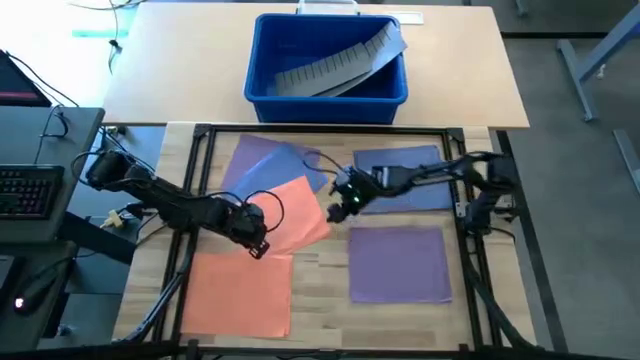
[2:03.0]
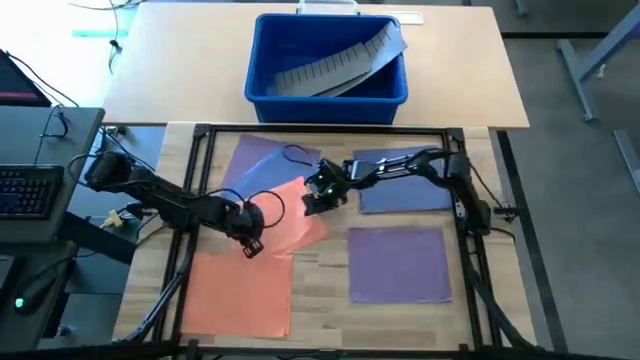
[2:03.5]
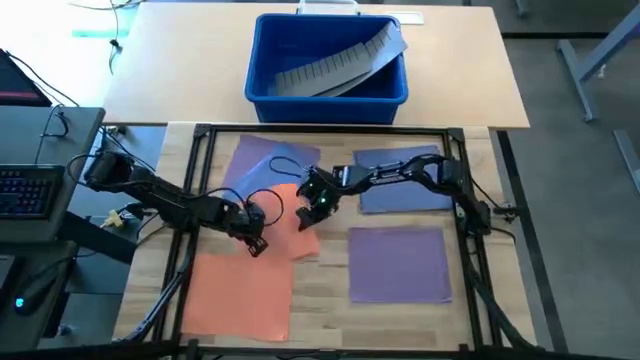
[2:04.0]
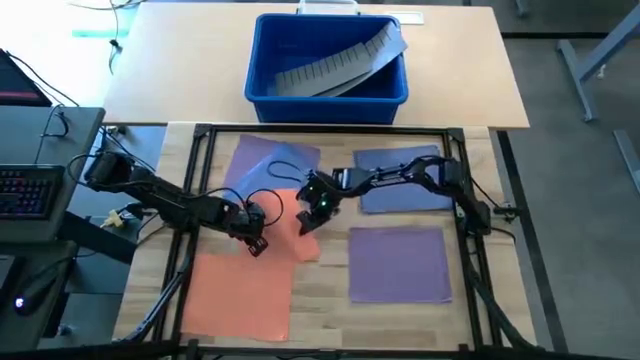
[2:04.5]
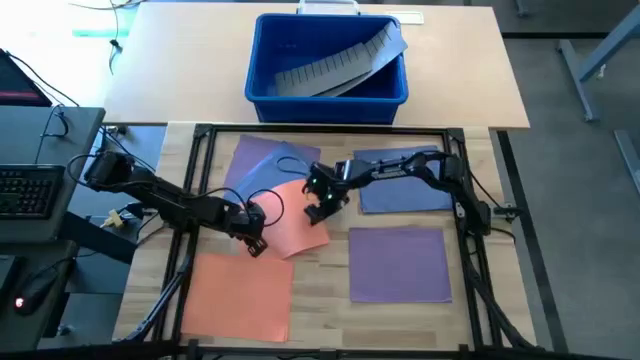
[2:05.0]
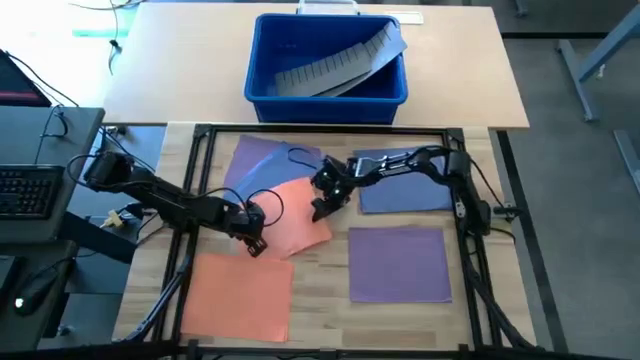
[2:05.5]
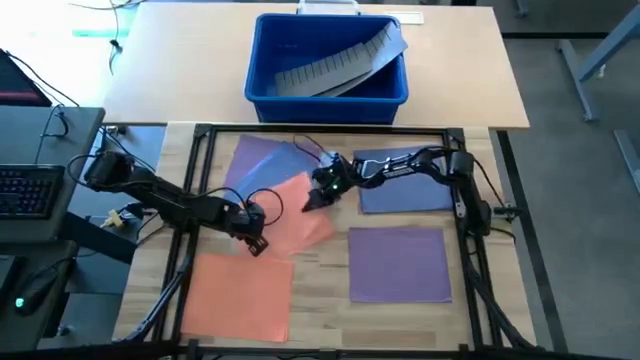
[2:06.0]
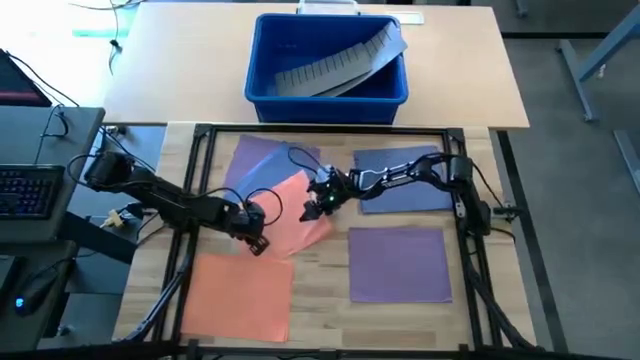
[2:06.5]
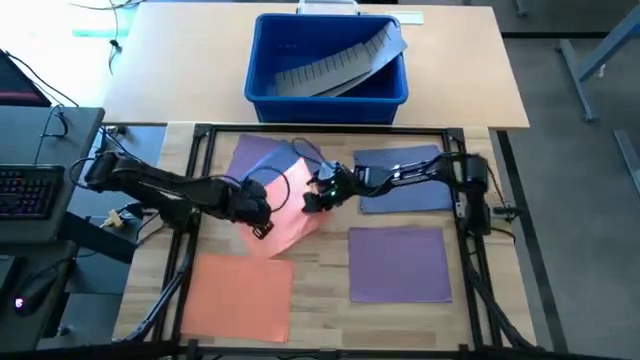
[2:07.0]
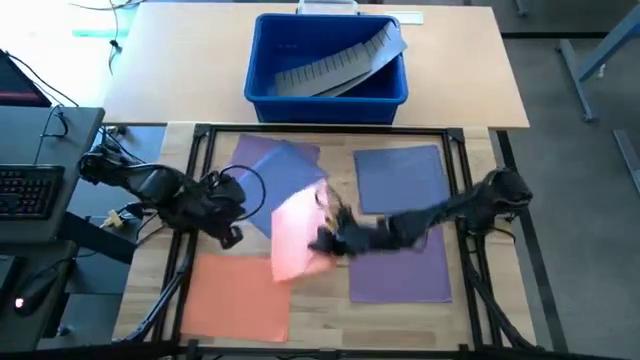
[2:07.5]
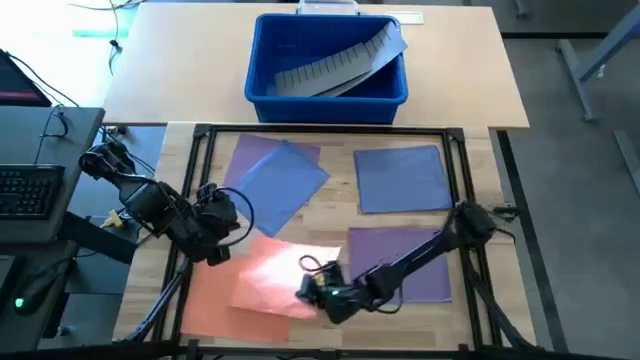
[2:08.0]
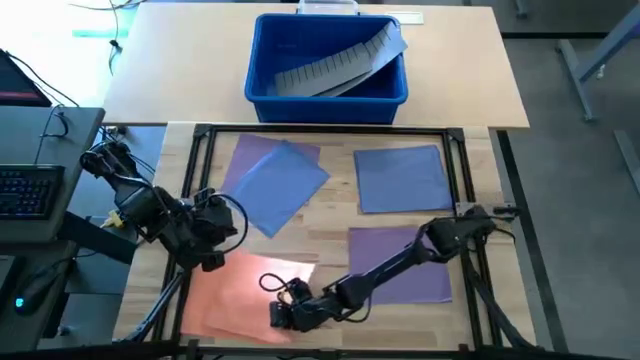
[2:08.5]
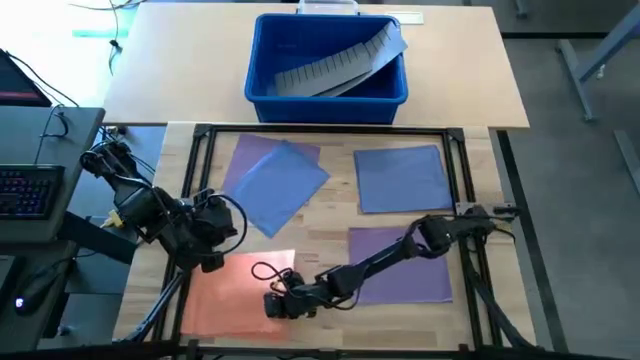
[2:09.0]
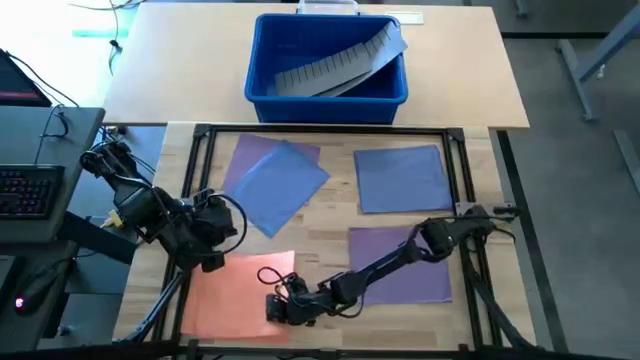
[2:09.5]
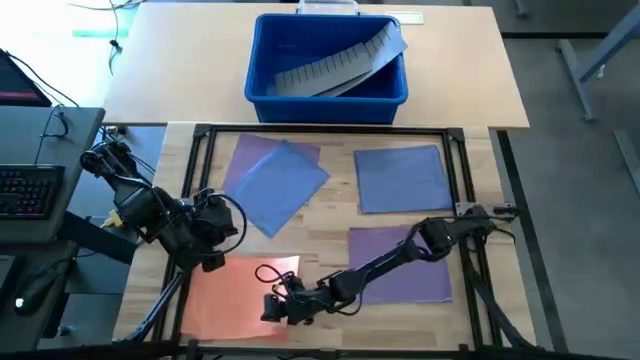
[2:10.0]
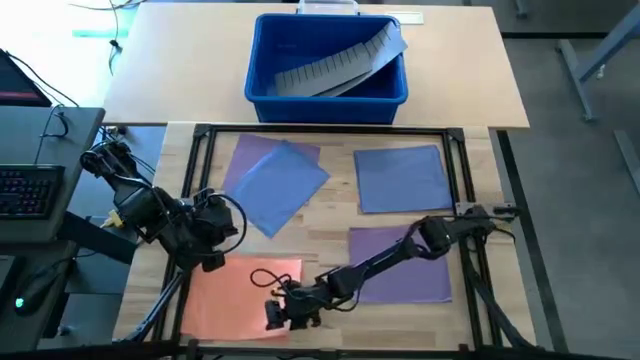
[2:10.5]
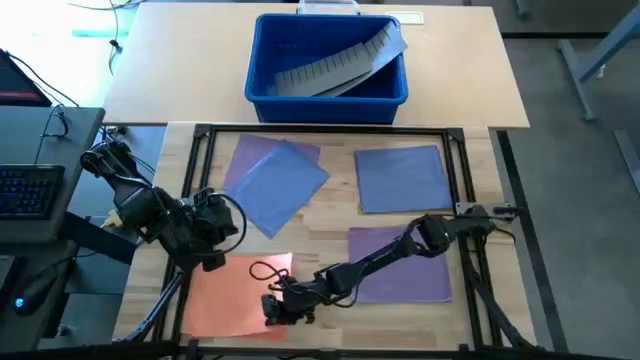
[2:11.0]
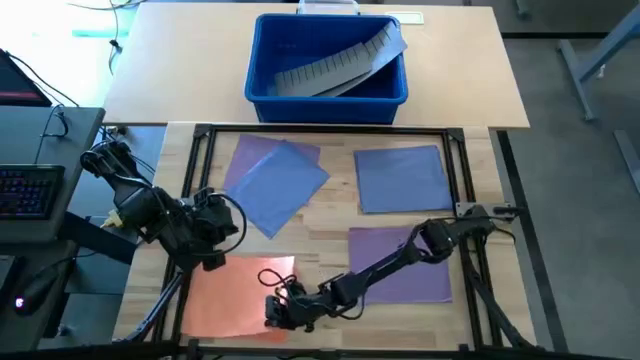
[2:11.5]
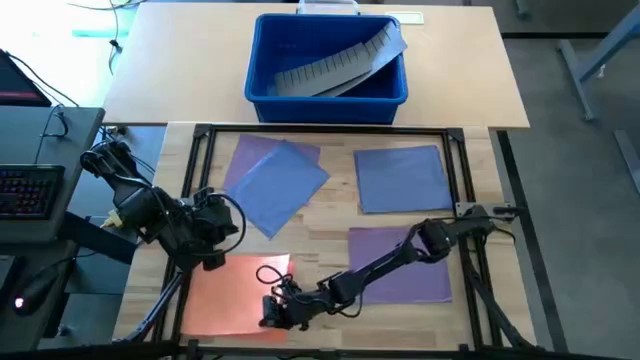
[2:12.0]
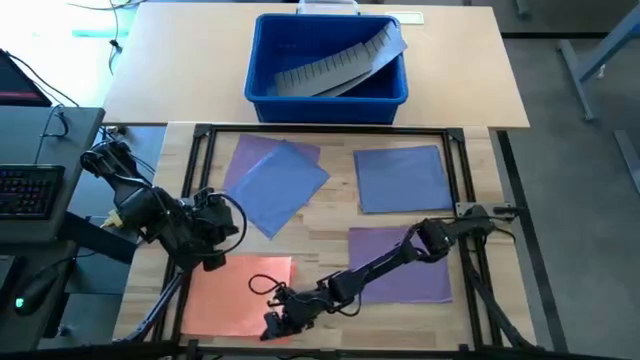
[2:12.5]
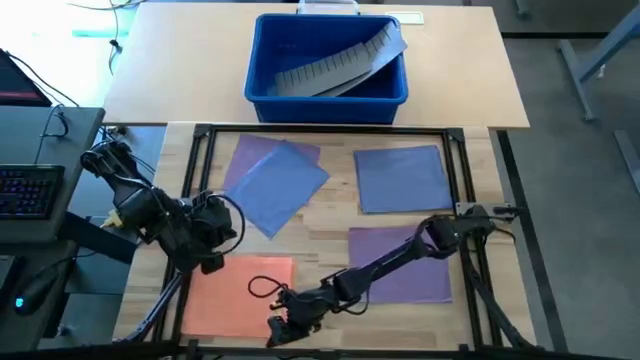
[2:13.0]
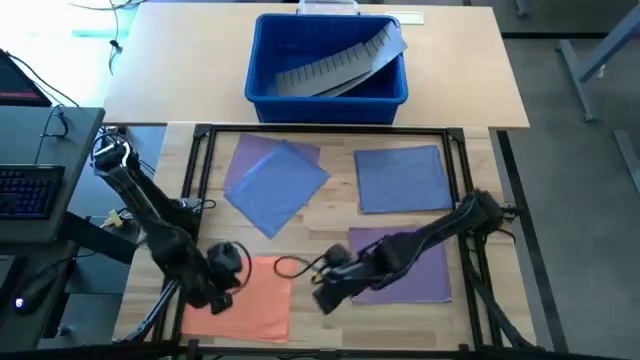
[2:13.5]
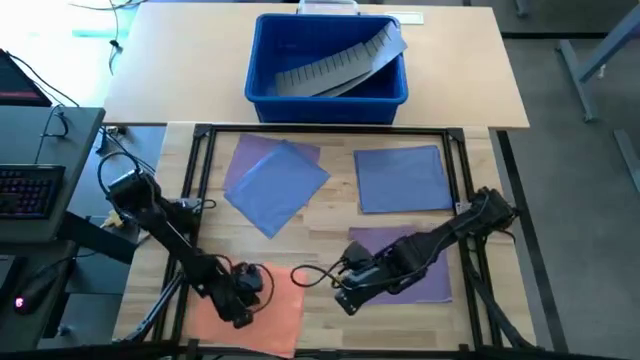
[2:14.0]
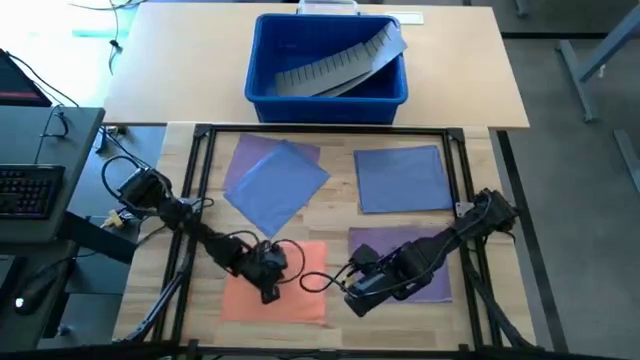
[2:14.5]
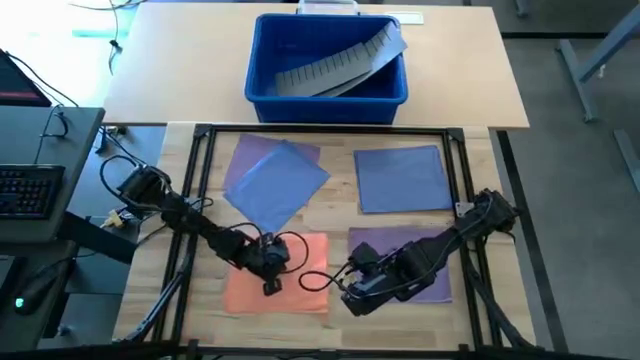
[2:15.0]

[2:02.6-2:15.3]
Task: Organize paper
Stack the orange paper on top of the orange paper

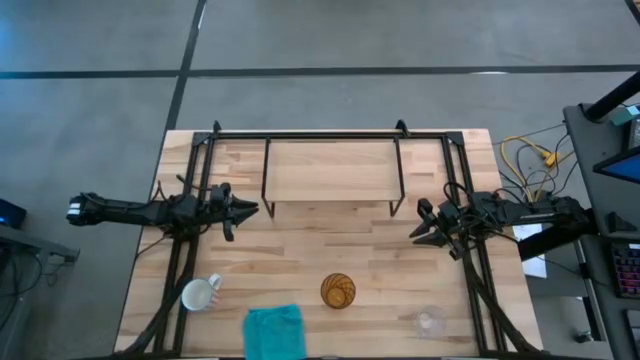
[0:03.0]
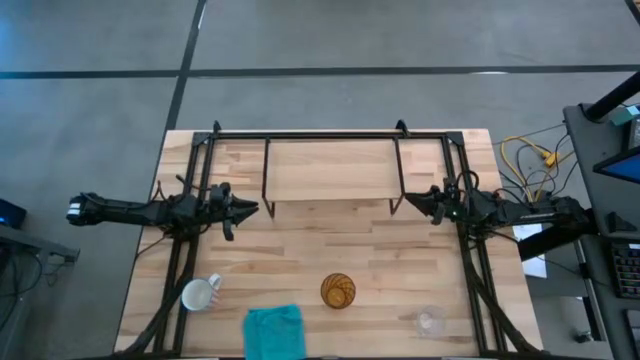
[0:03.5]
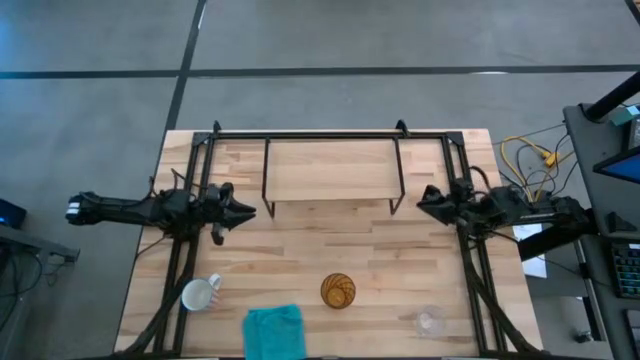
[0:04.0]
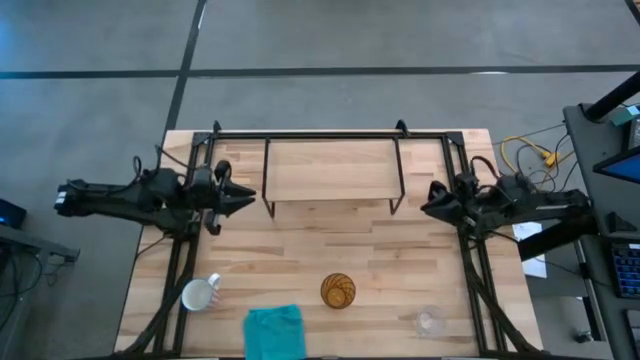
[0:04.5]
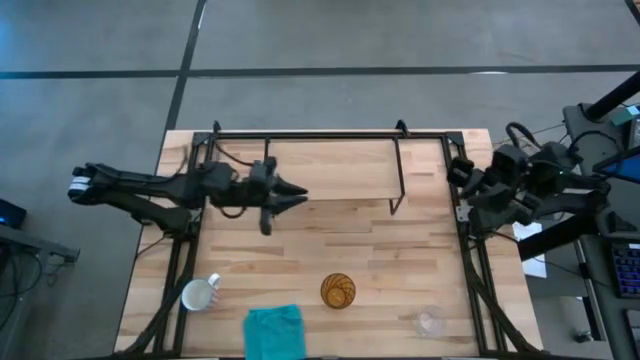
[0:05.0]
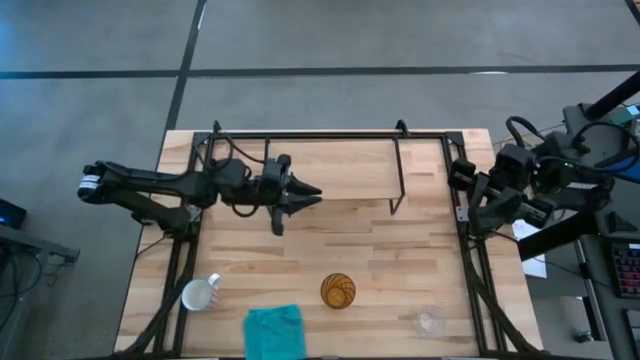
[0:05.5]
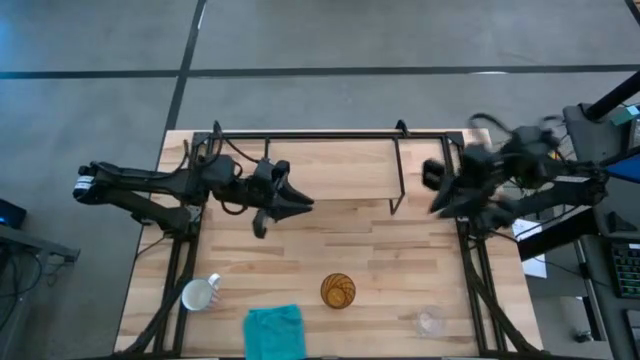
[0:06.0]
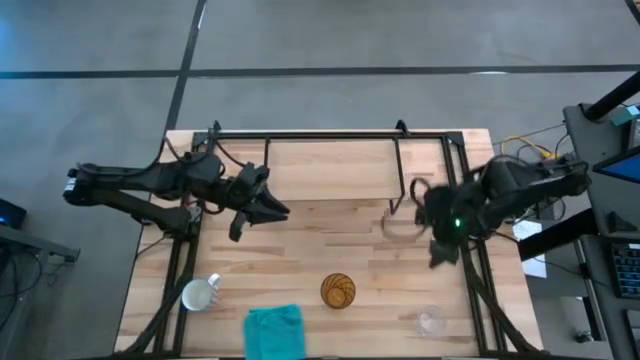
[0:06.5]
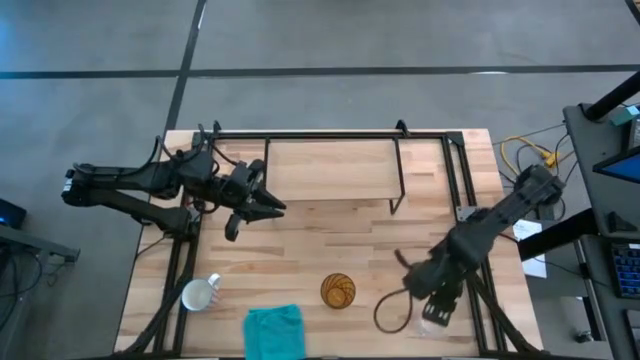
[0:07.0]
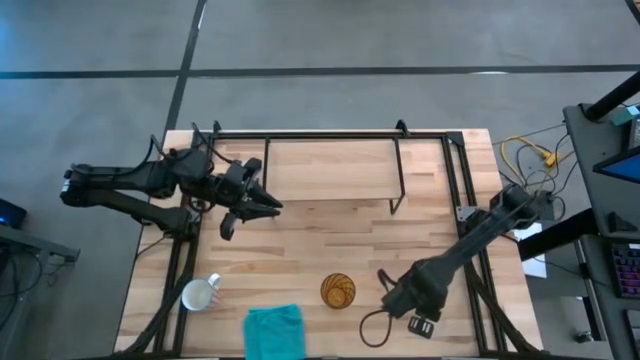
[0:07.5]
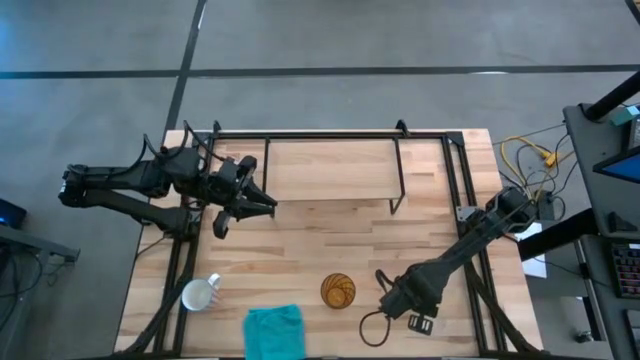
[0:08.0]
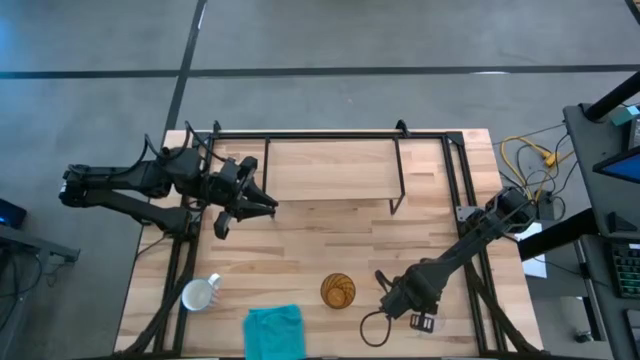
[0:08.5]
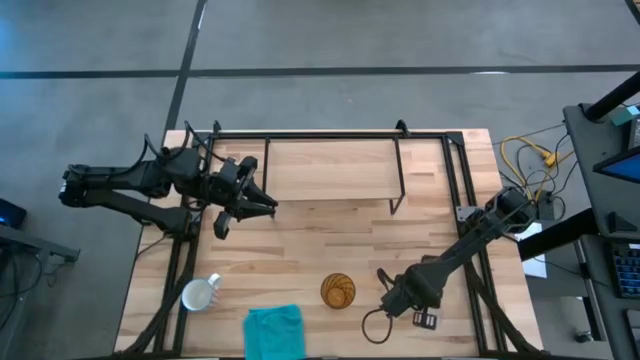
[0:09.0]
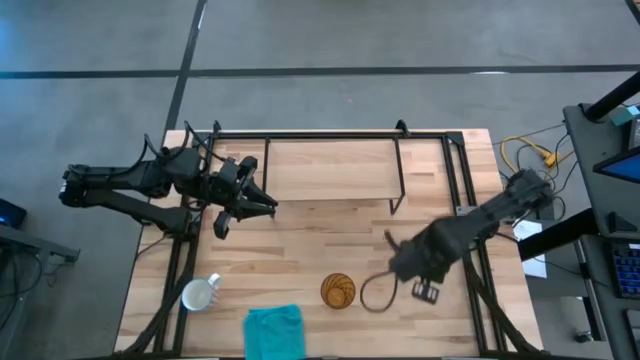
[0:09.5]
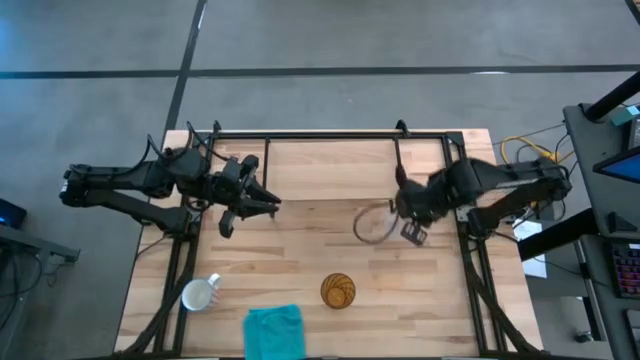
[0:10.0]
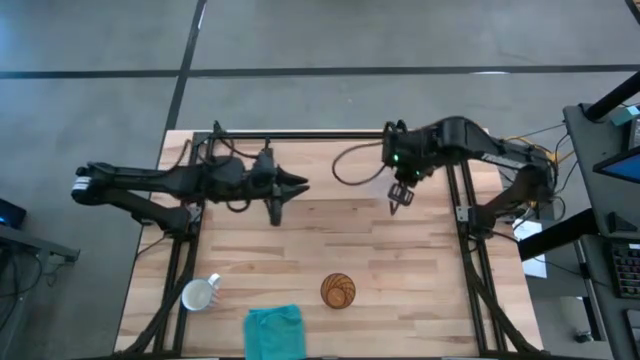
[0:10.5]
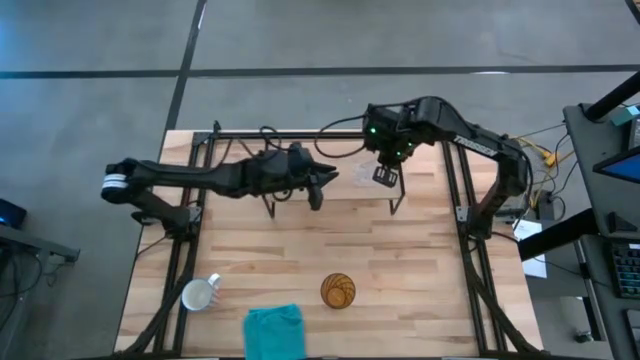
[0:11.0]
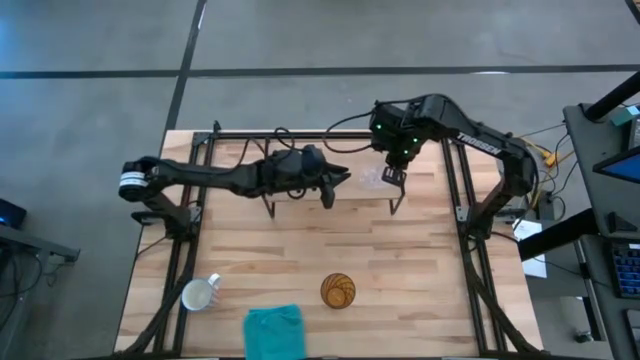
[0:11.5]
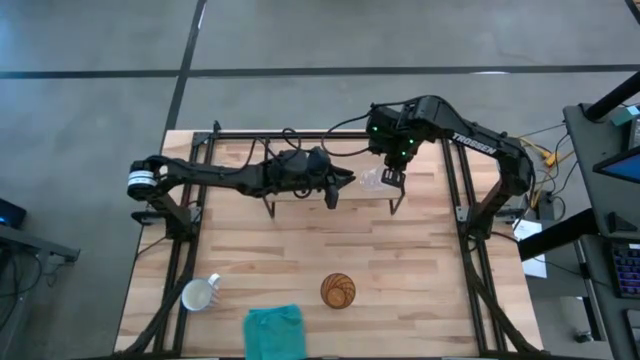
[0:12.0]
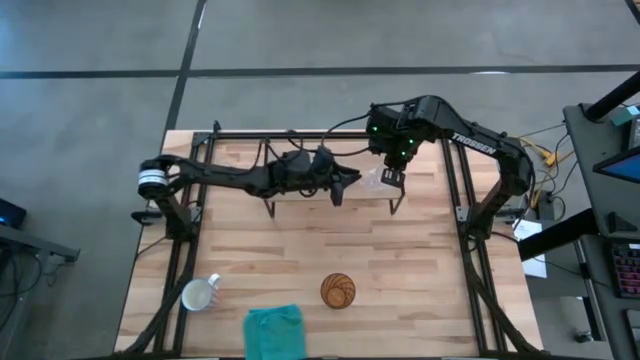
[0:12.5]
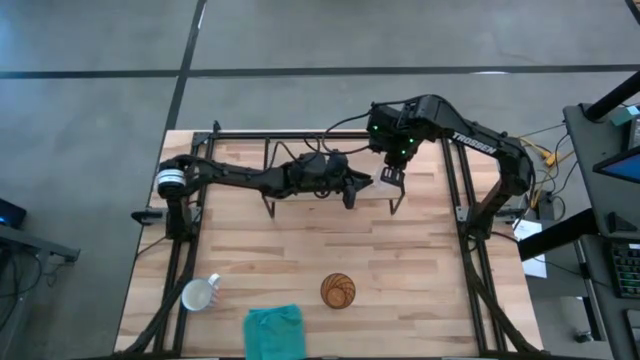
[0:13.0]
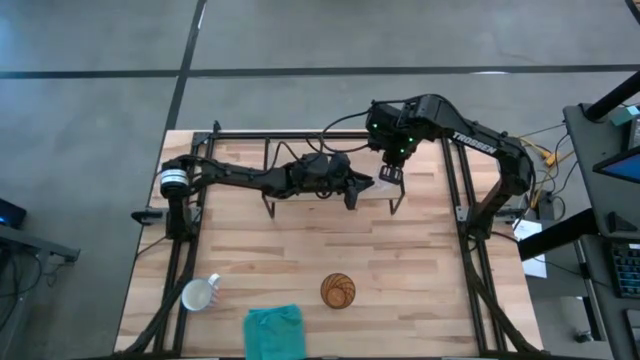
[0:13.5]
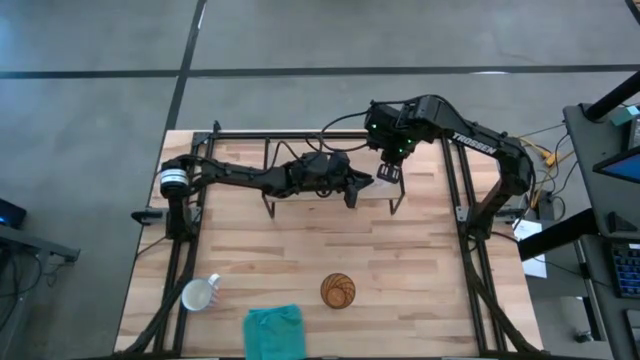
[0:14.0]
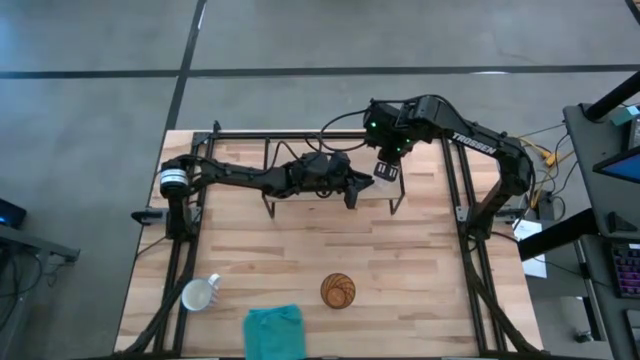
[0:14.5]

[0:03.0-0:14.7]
Task: Stack small to large cups/mugs on shelf
Put the transparent mug on the shelf
